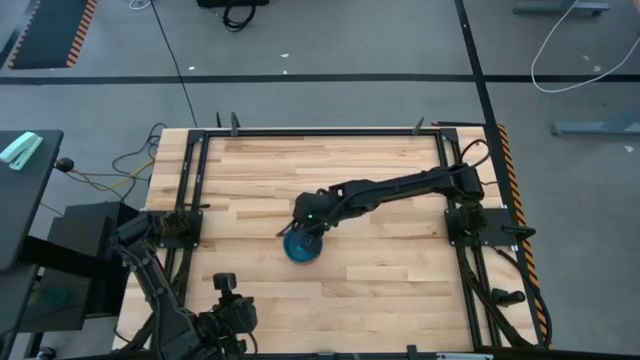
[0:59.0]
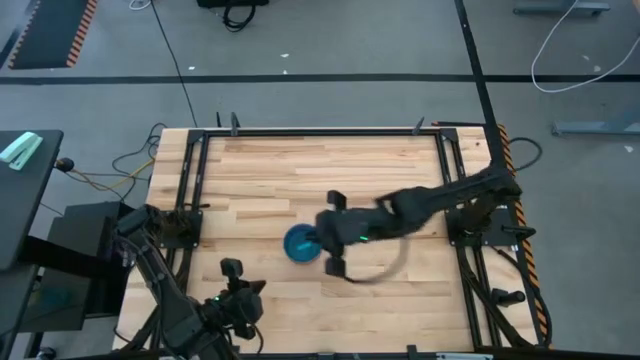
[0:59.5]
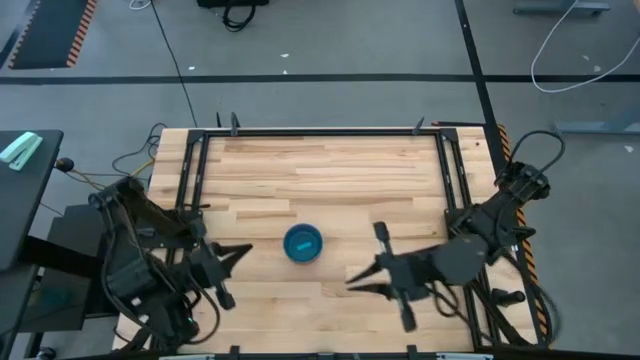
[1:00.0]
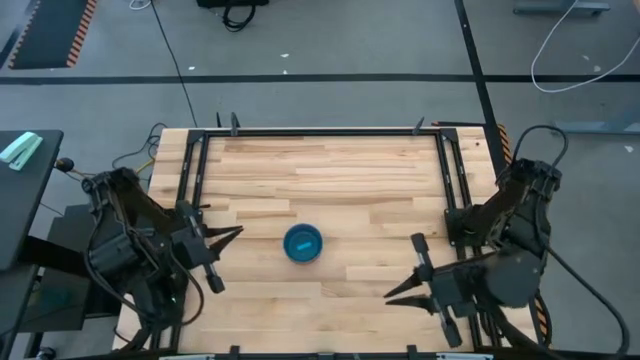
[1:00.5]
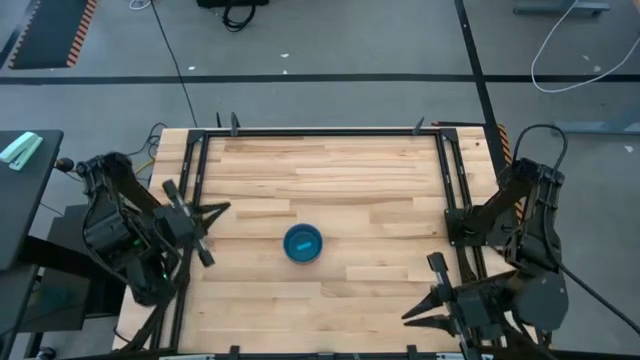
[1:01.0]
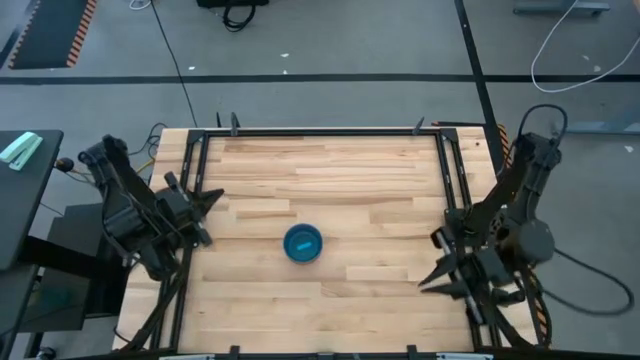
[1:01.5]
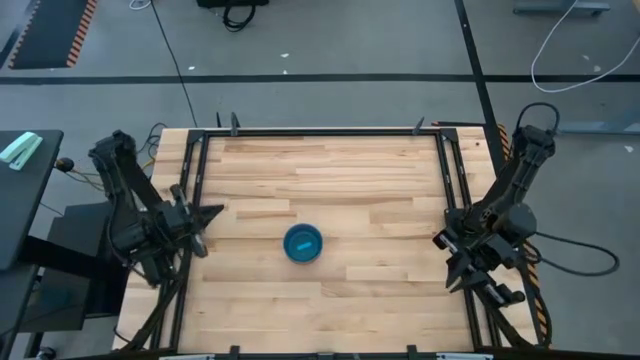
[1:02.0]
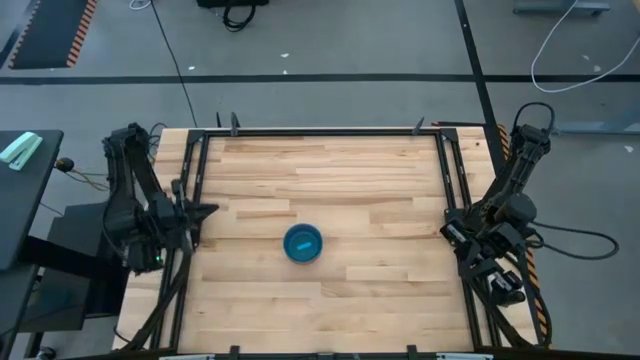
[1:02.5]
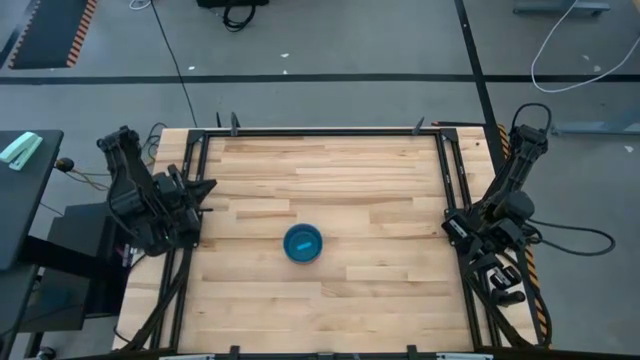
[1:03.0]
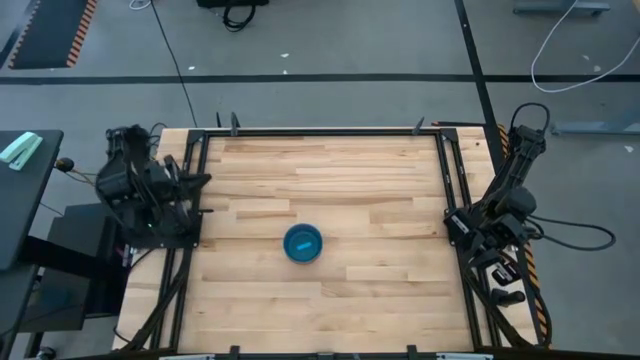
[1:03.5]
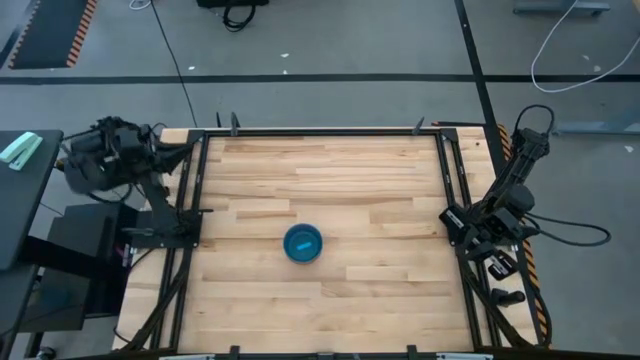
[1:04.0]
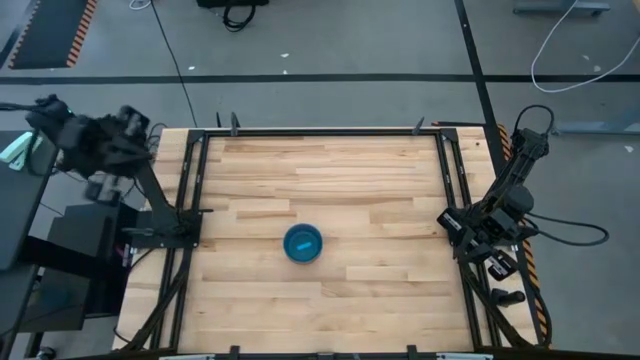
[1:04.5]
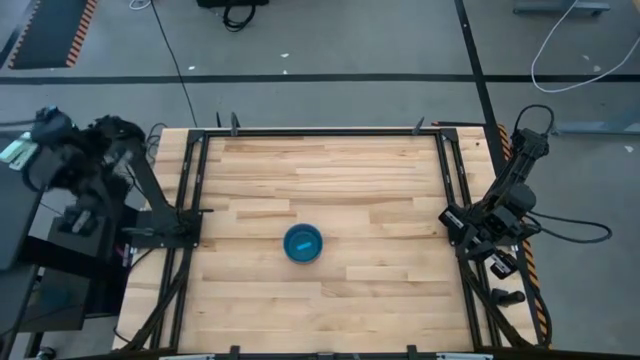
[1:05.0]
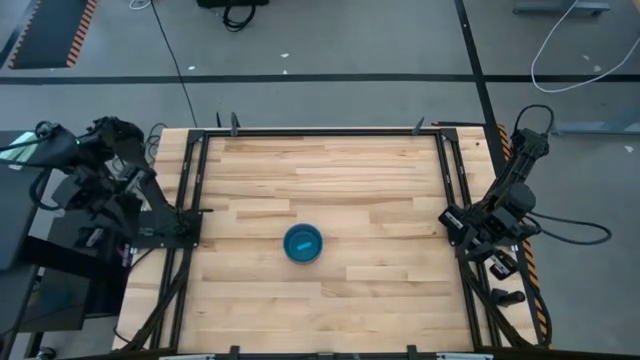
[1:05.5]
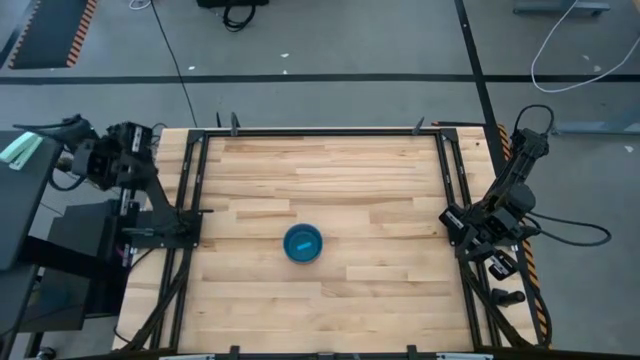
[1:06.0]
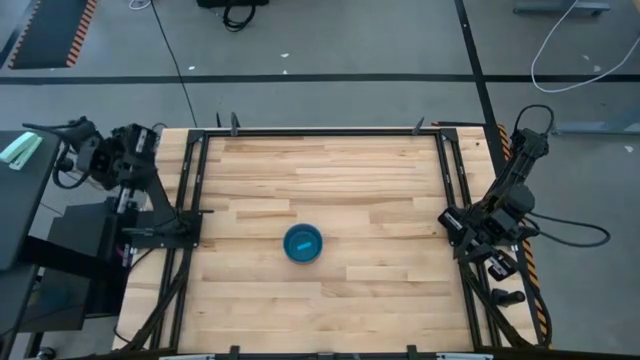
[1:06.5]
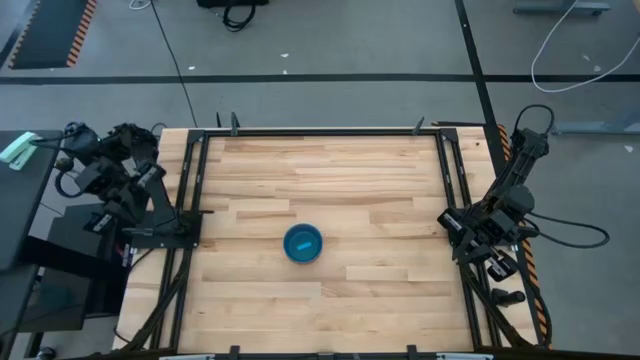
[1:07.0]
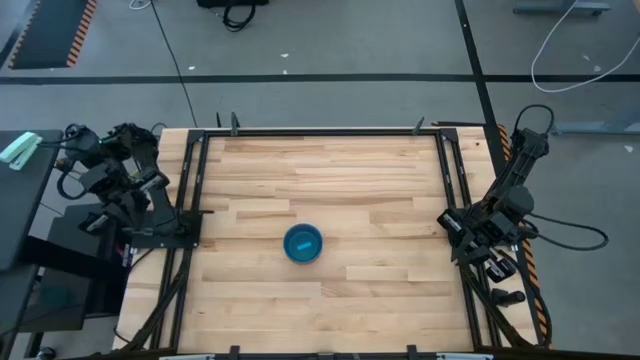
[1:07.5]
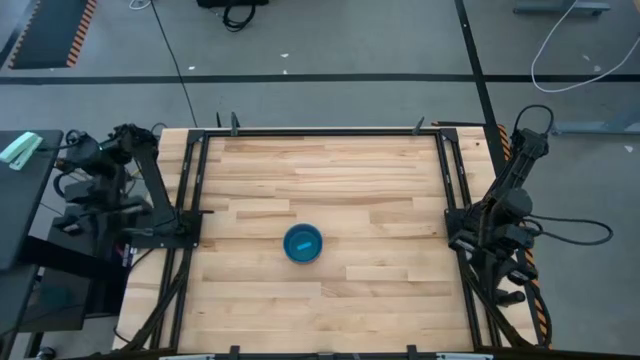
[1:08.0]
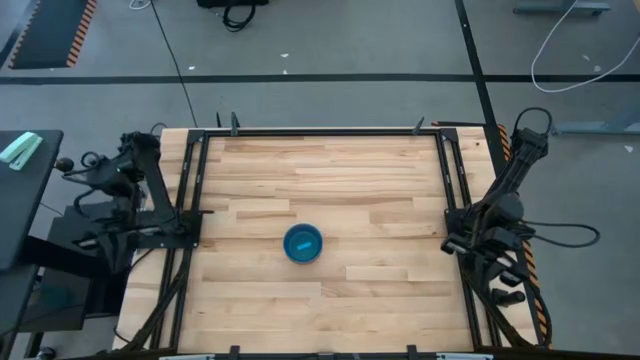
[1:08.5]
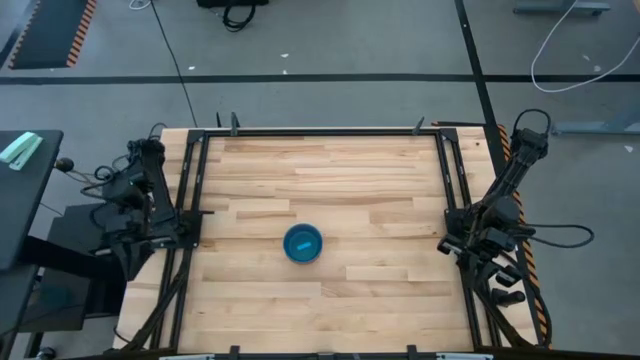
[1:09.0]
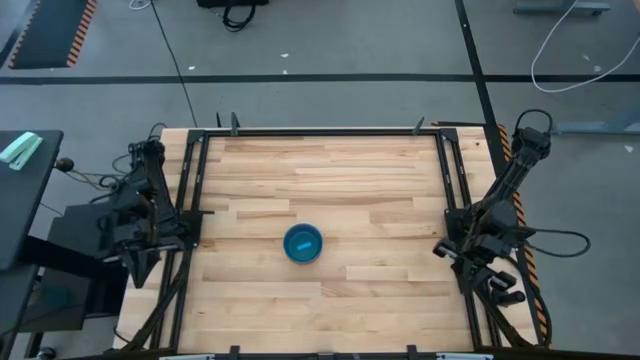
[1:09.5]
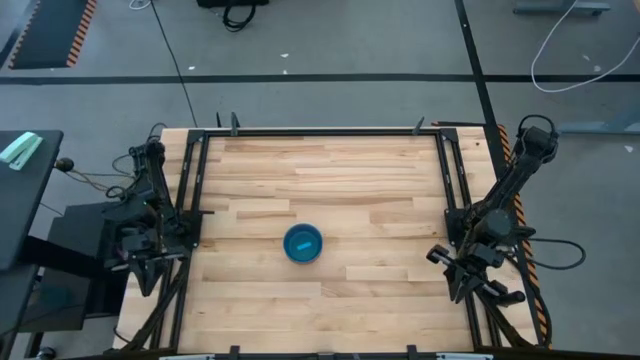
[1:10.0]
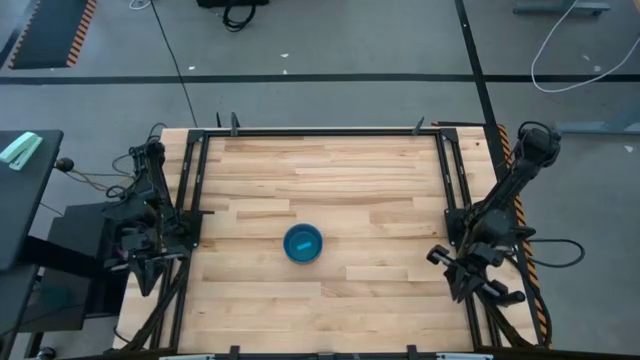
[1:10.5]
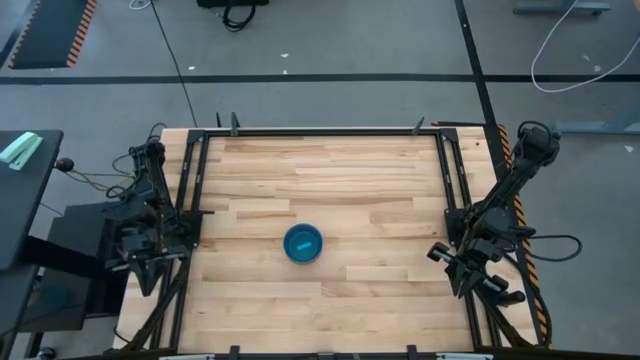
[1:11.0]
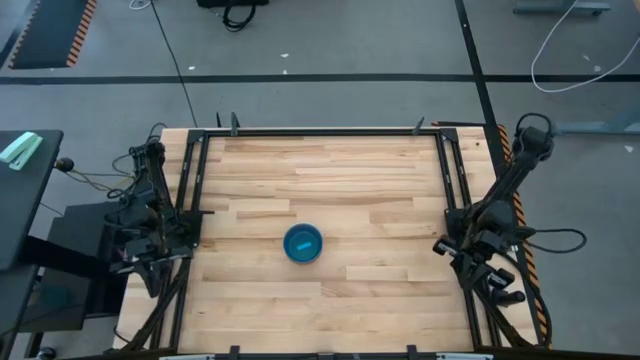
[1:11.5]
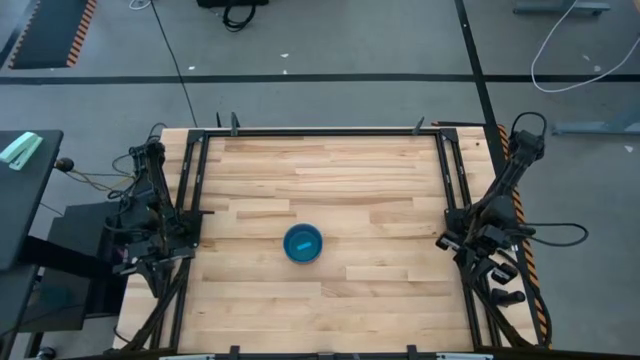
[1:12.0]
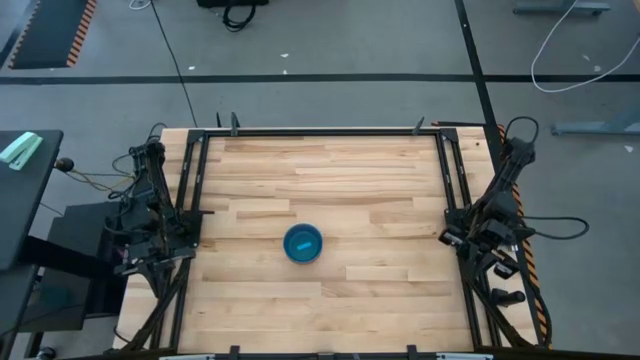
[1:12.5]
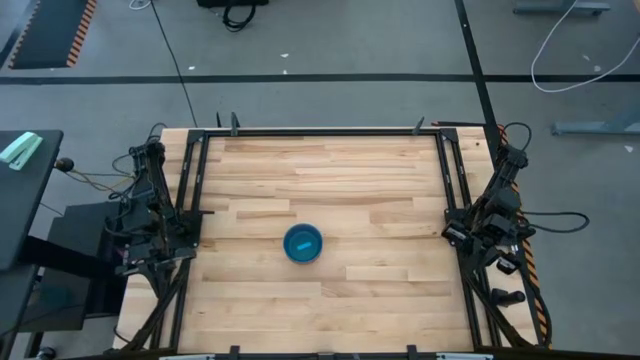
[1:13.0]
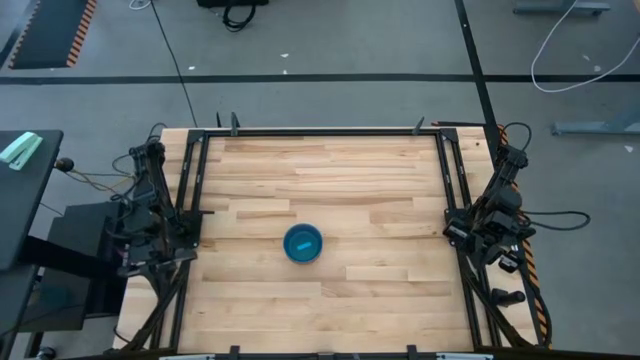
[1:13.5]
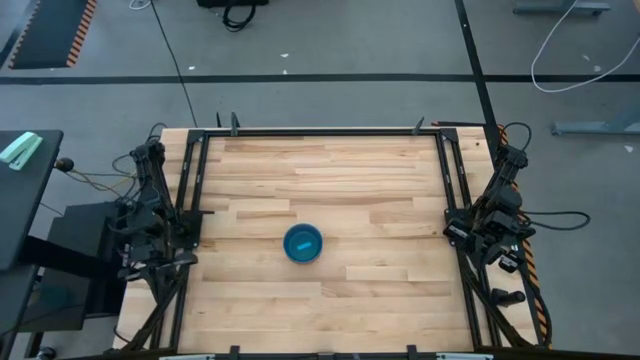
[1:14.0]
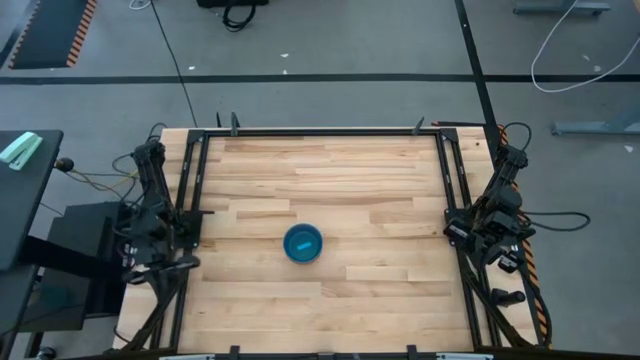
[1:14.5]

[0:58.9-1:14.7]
Task: Nest bowls inside each other
Return to Home Position

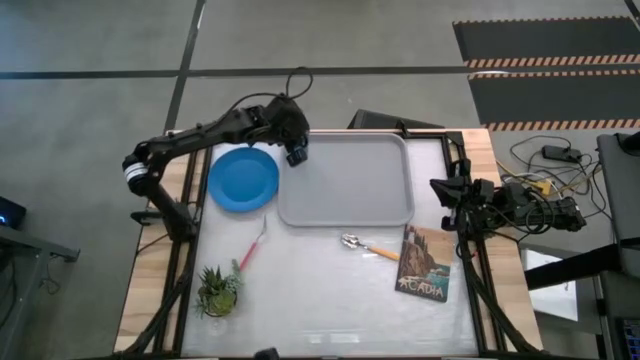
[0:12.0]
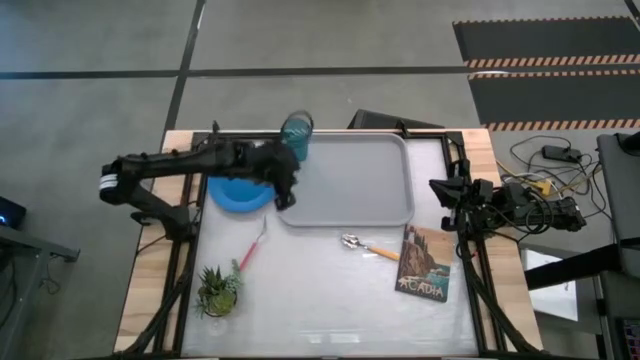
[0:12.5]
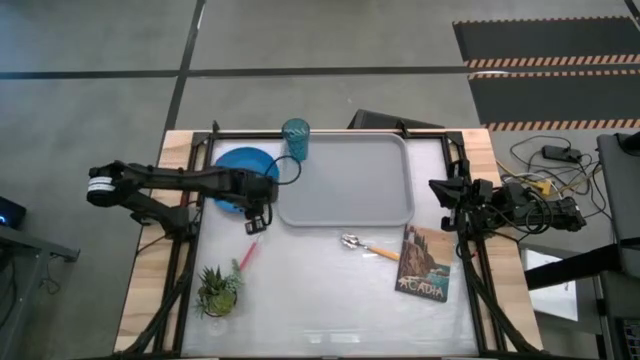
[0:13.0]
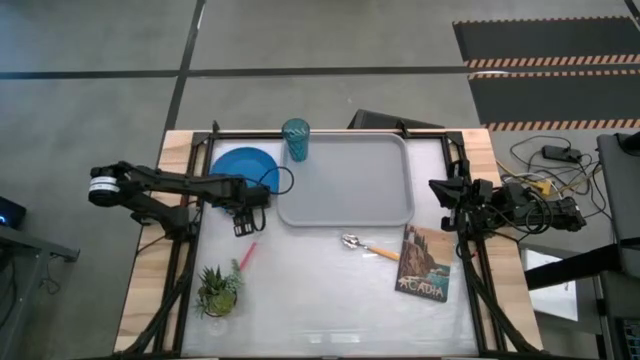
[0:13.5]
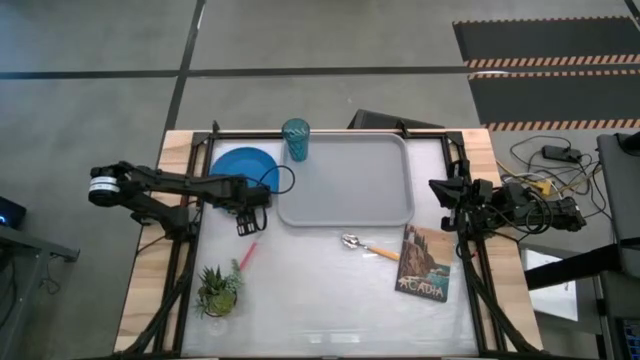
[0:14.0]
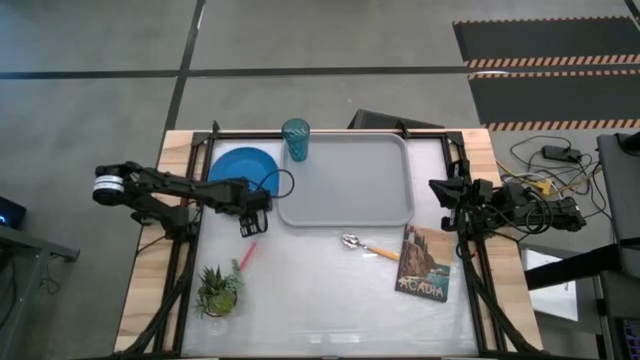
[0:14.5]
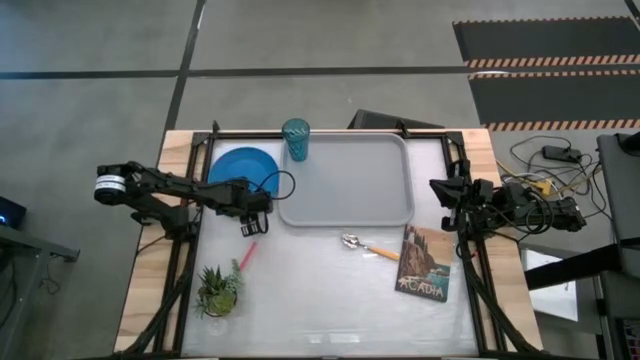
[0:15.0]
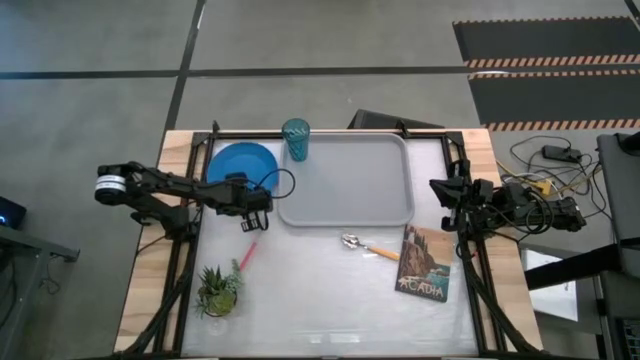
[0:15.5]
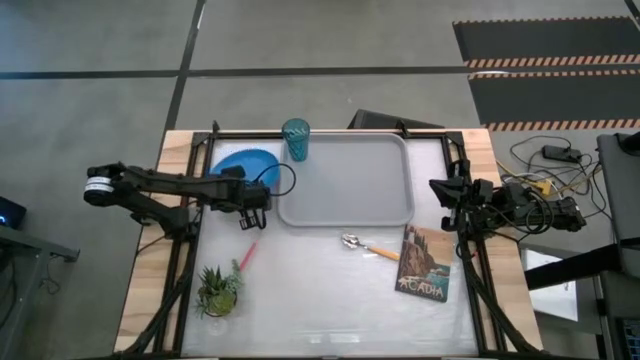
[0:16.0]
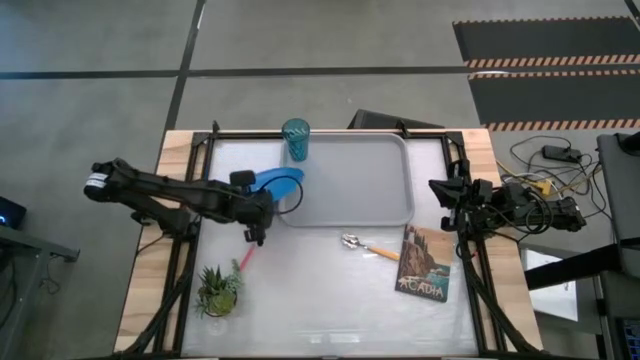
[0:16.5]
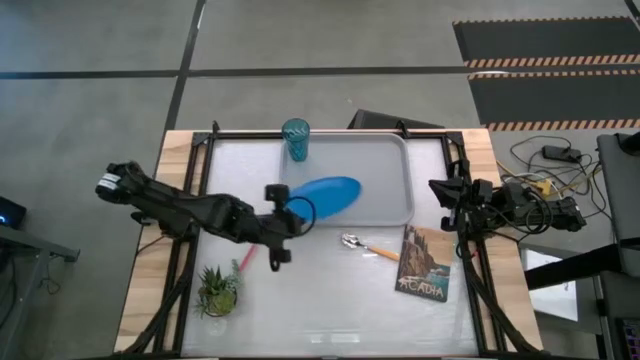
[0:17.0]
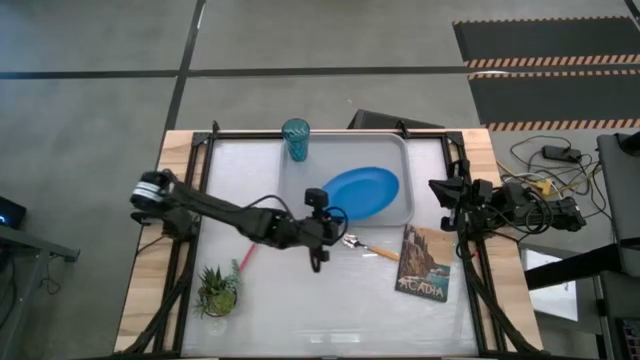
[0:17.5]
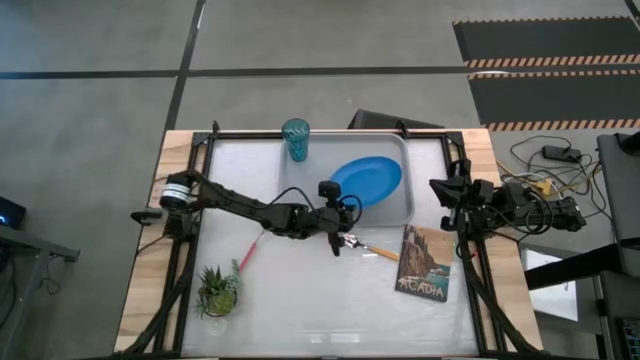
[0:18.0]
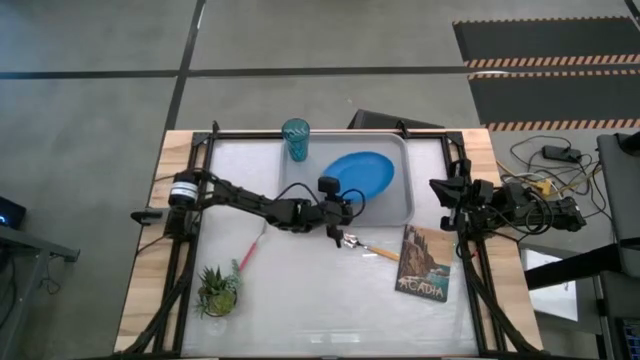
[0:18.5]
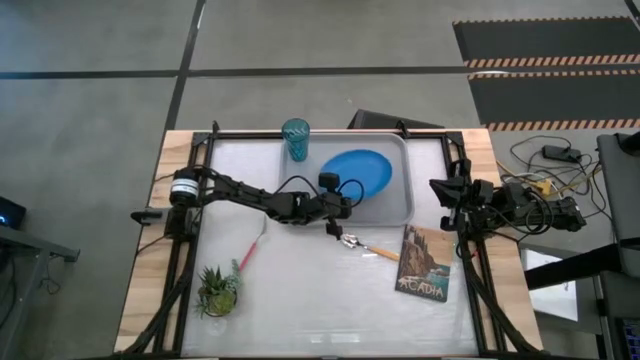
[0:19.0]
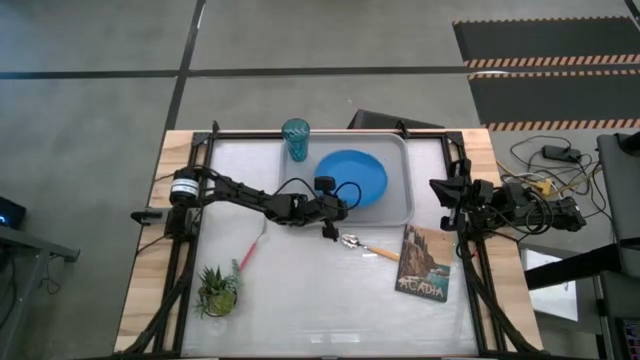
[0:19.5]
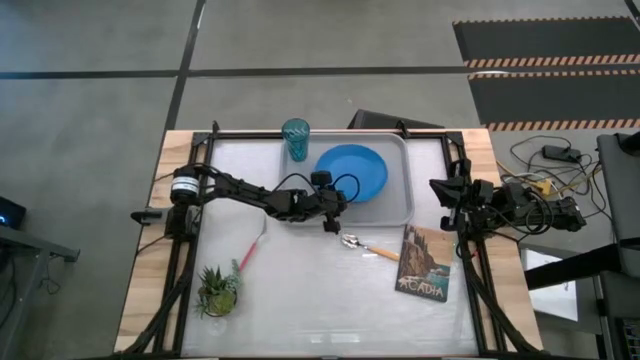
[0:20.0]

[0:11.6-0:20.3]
Task: Pick and place plate/cup/fork/spoon on tray
Put the blue plate on the gray serving tray
